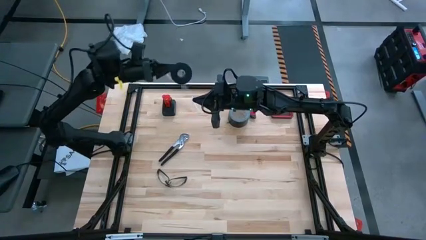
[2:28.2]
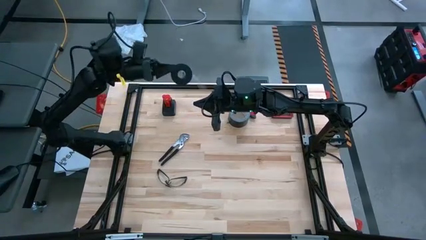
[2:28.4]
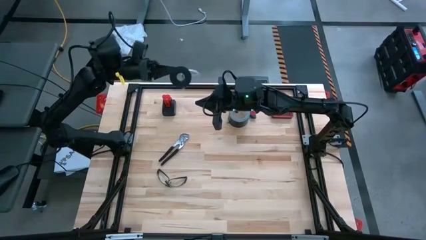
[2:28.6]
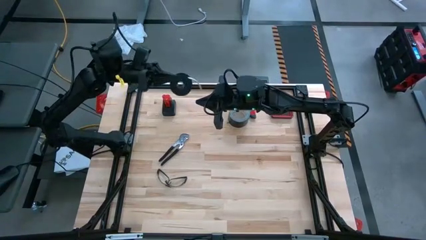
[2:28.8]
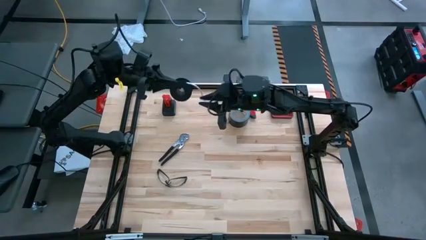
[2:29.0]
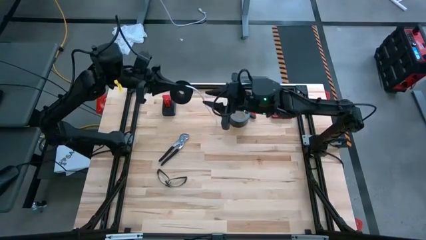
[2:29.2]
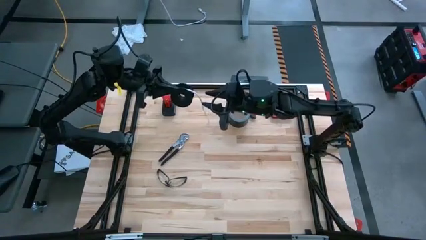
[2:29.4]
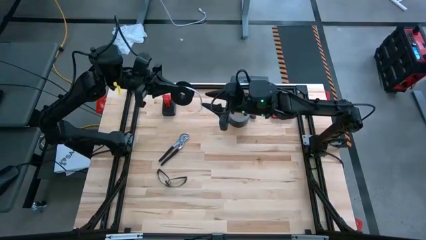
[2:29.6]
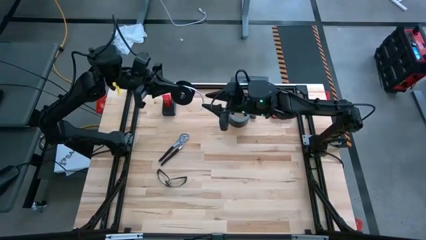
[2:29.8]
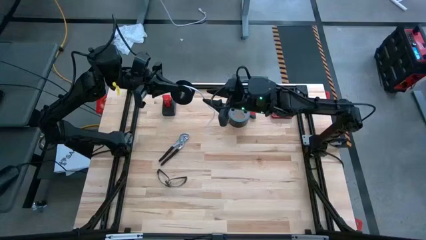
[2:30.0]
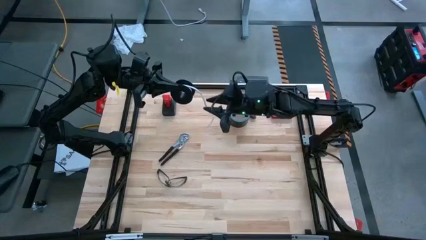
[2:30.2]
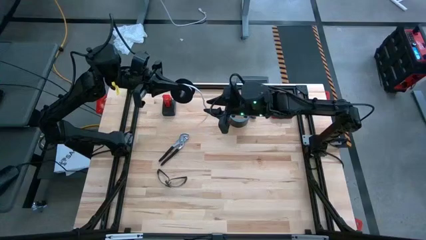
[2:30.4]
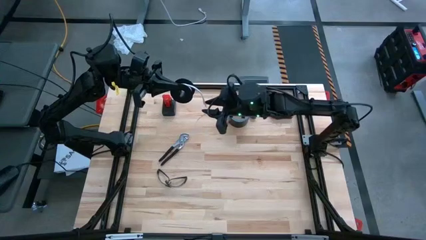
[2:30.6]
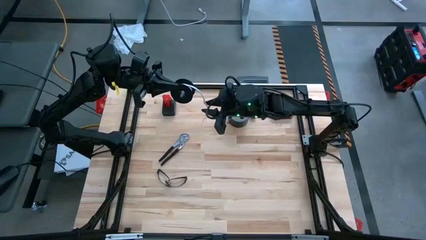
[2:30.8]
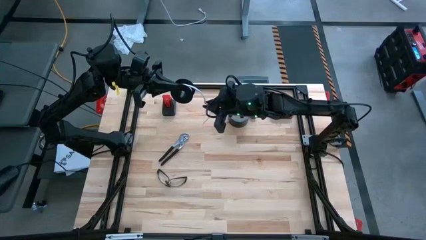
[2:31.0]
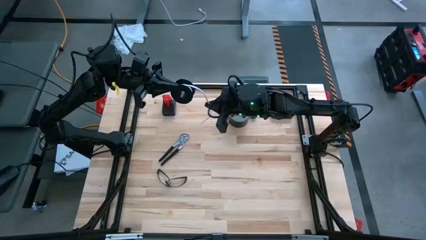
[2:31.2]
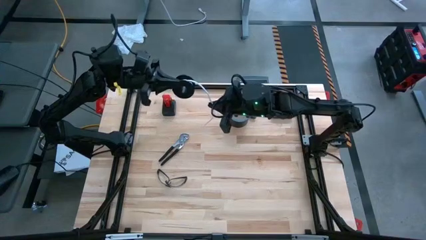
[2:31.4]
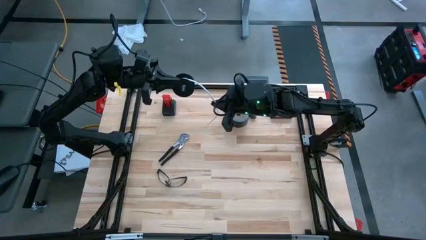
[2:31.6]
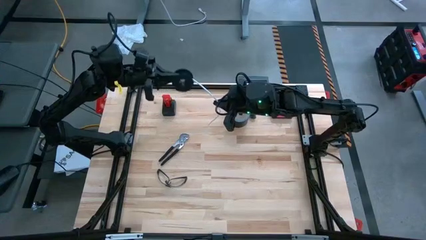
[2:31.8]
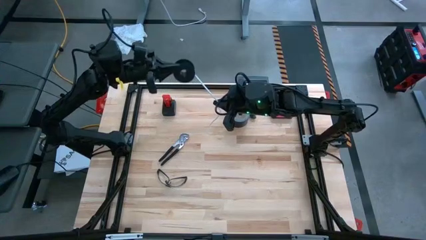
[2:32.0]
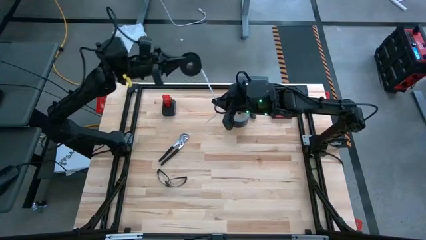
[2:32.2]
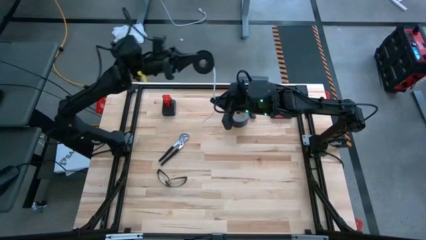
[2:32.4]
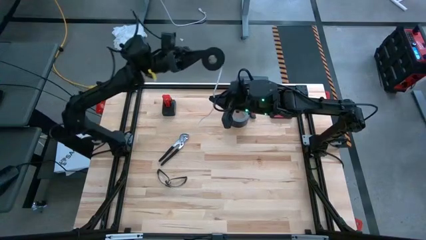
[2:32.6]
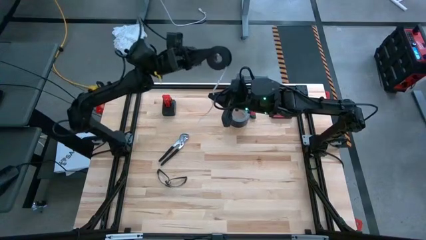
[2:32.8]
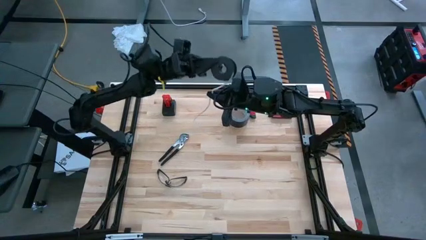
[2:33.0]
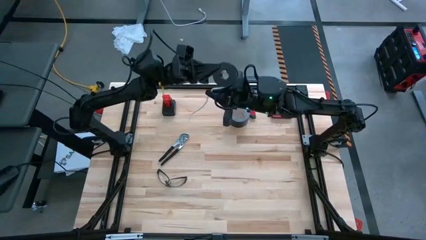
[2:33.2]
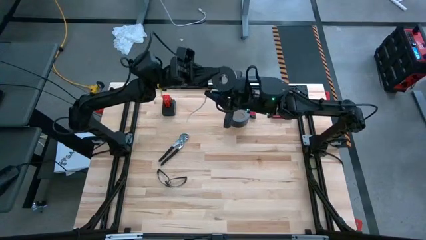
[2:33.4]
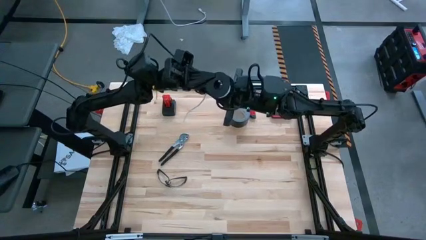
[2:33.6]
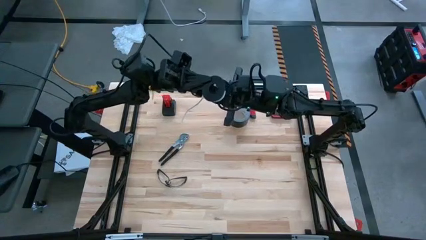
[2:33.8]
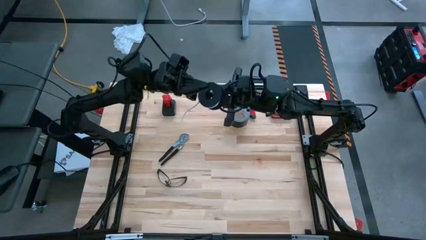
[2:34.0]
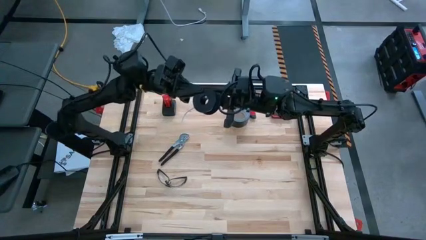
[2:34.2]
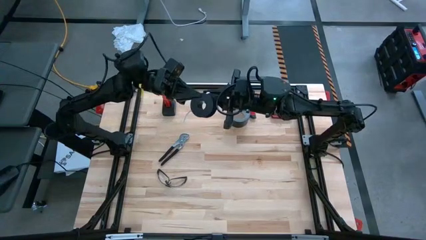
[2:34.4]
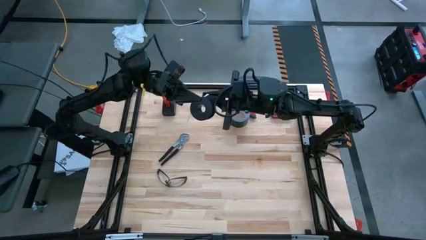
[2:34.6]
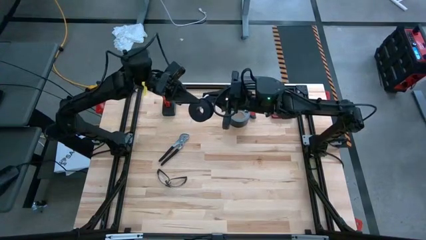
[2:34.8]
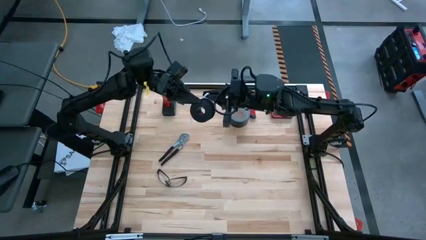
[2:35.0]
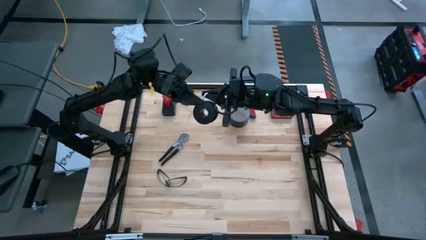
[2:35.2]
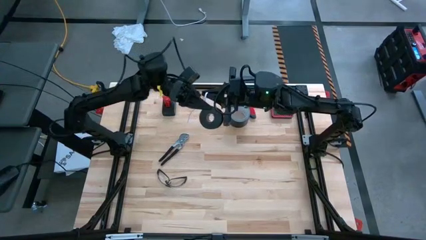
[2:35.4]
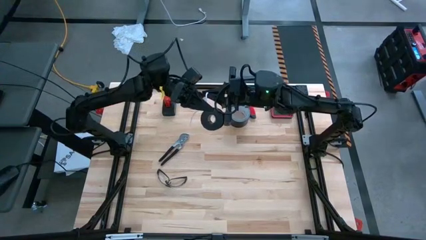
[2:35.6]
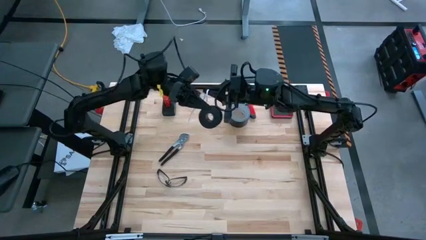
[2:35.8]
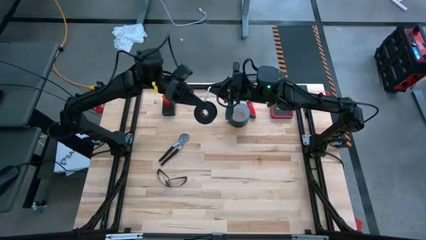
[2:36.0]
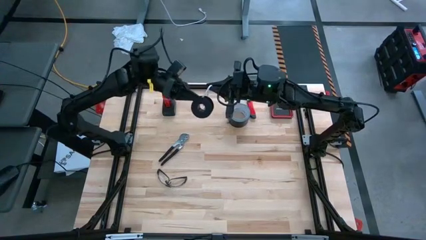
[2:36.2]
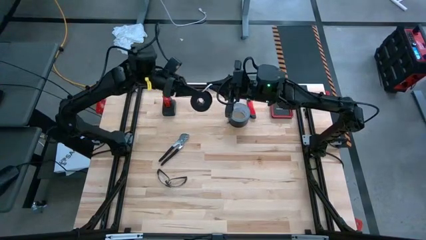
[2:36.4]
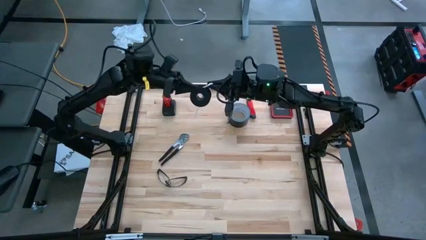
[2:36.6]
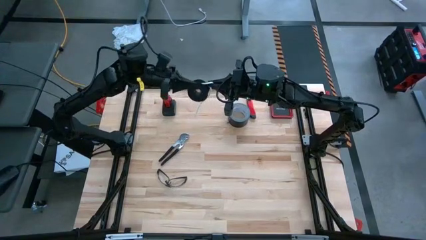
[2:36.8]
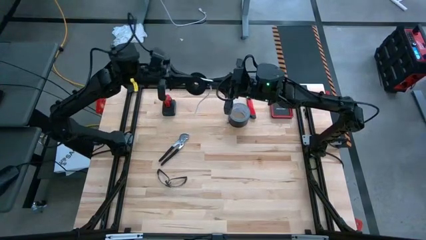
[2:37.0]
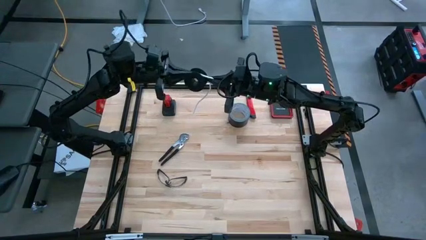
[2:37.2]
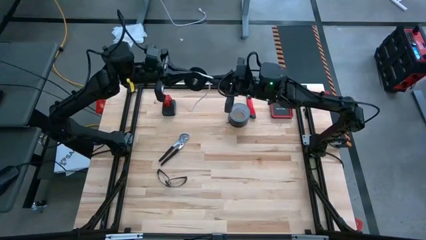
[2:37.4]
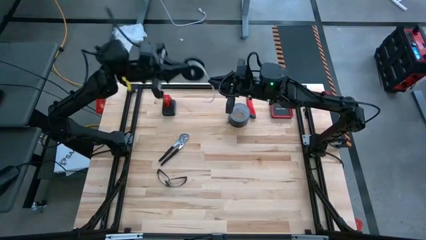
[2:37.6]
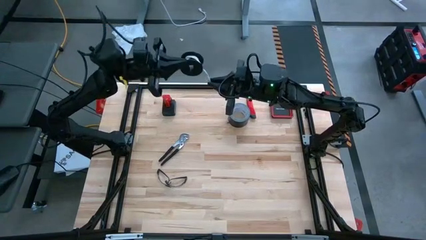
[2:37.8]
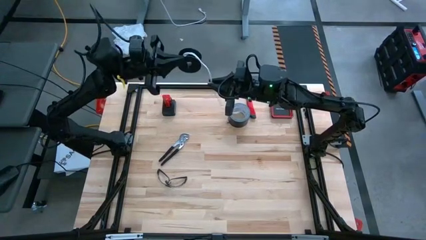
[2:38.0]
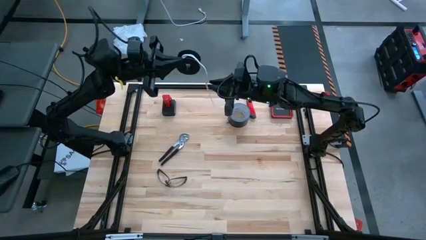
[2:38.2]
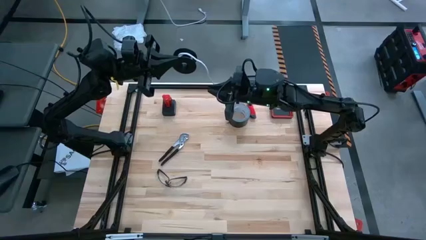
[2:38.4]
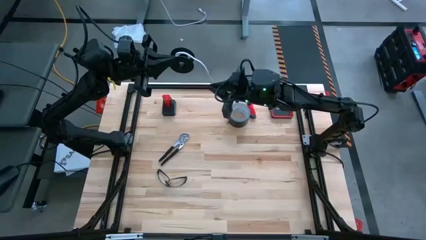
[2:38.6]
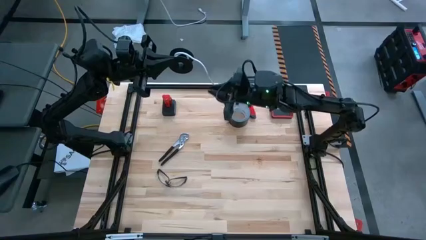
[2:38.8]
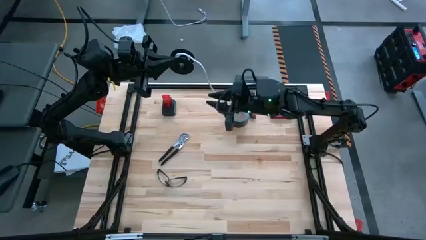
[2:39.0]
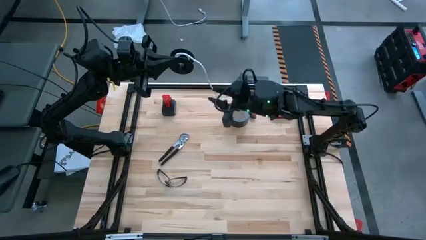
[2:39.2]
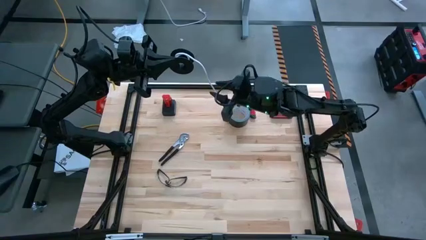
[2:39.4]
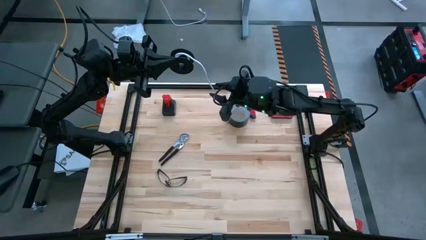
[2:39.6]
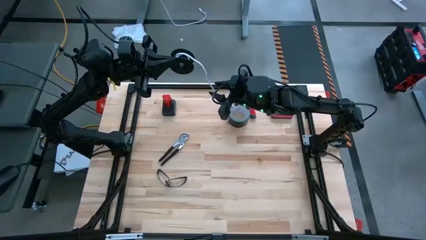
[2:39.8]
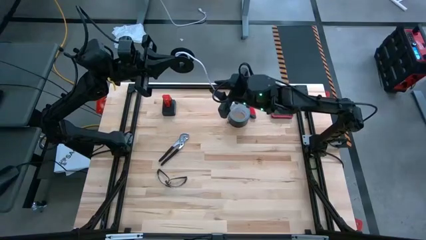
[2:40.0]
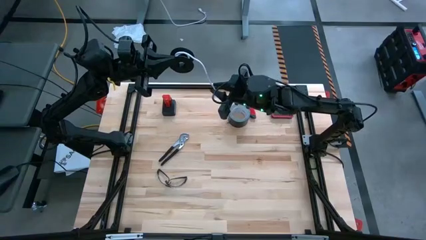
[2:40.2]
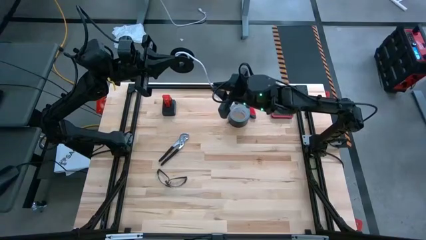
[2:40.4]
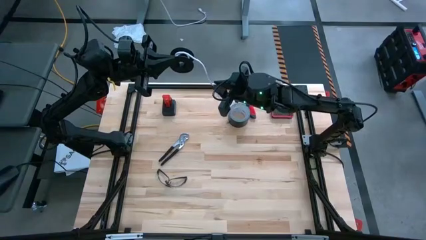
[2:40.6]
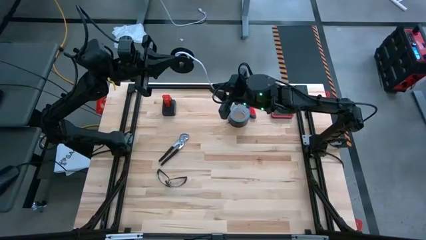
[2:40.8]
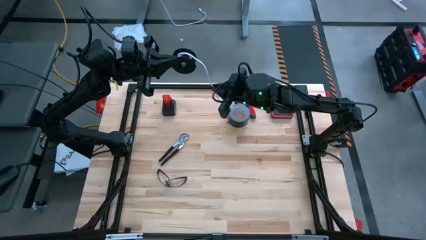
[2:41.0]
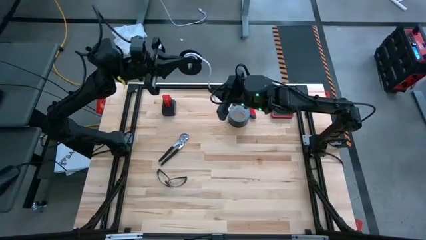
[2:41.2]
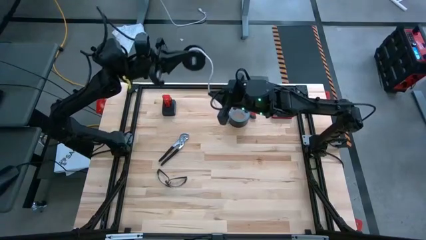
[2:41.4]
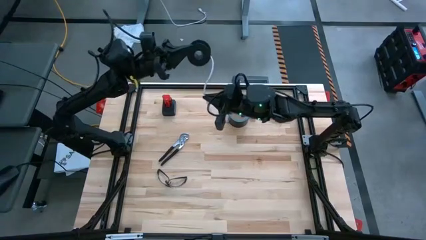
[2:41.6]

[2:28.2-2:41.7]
Task: Coil cords
Coil the white wire onto the black spool

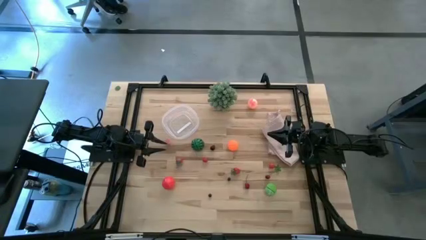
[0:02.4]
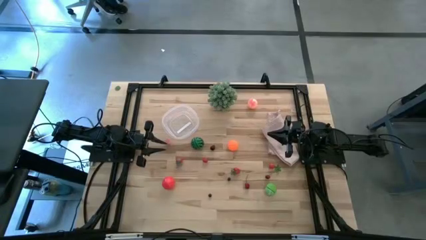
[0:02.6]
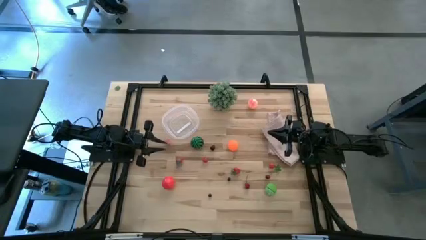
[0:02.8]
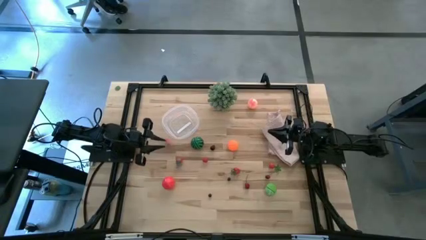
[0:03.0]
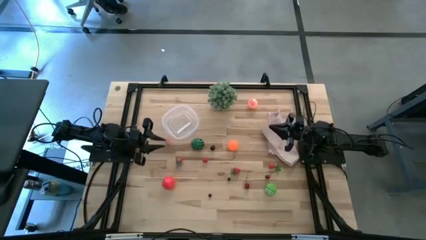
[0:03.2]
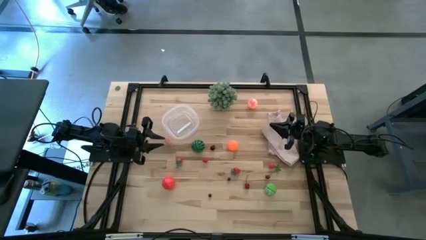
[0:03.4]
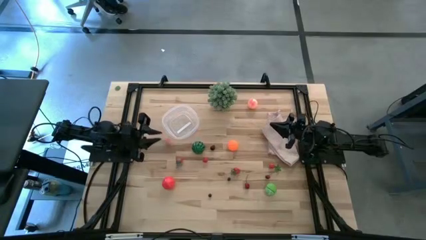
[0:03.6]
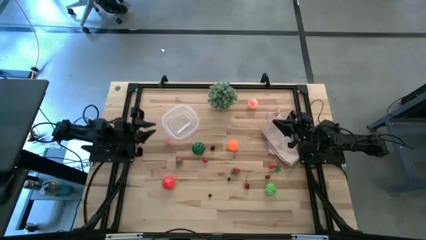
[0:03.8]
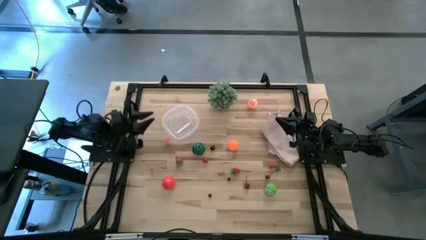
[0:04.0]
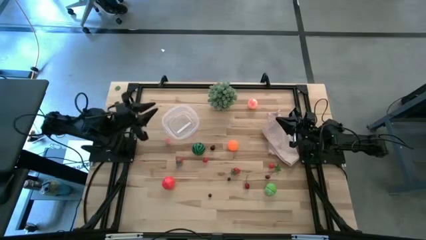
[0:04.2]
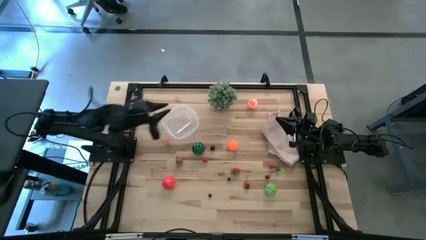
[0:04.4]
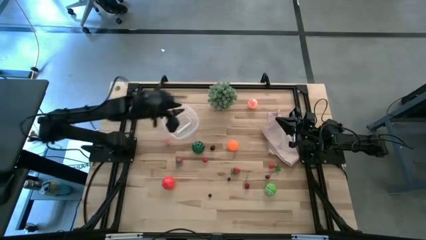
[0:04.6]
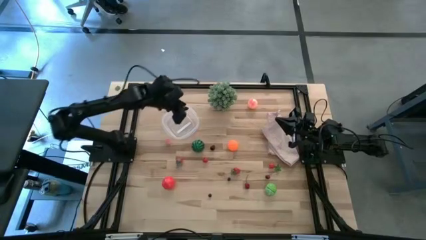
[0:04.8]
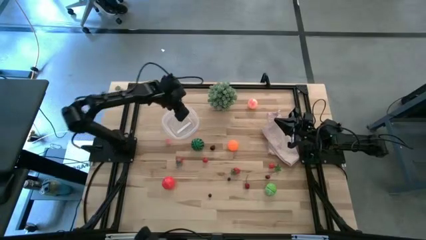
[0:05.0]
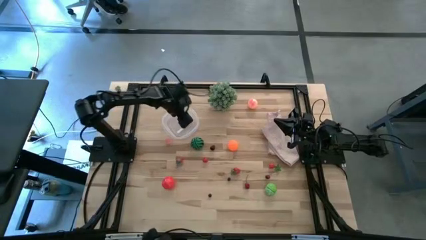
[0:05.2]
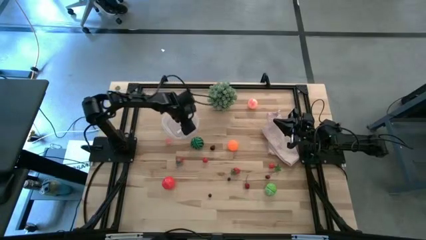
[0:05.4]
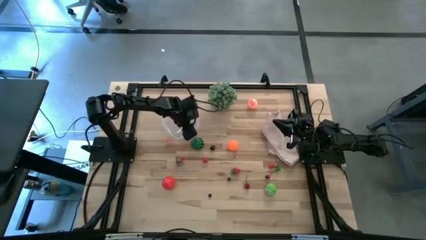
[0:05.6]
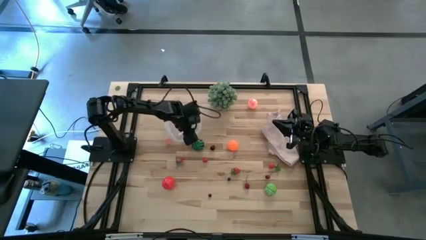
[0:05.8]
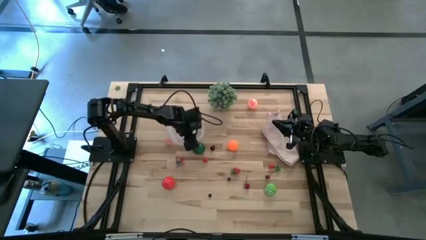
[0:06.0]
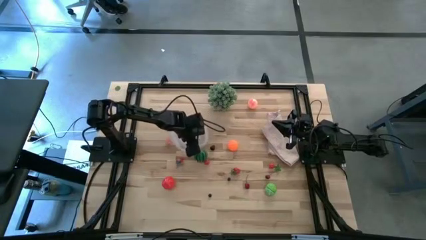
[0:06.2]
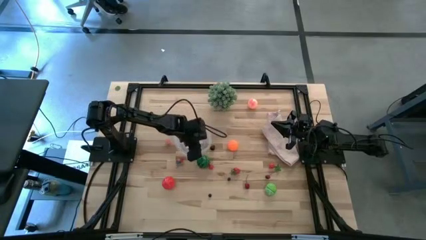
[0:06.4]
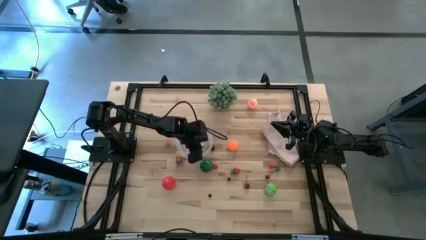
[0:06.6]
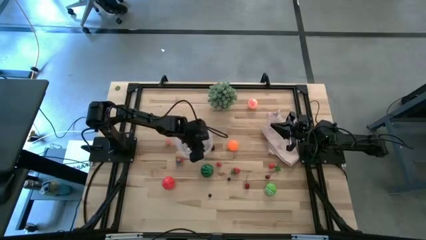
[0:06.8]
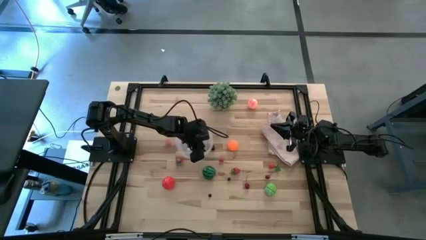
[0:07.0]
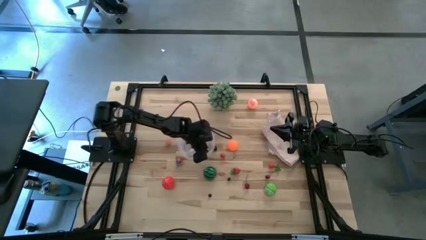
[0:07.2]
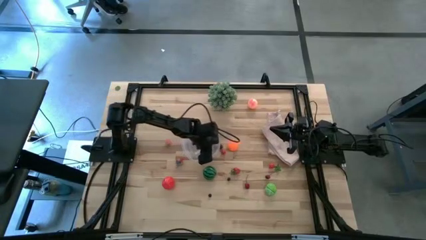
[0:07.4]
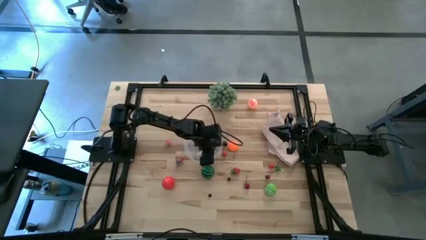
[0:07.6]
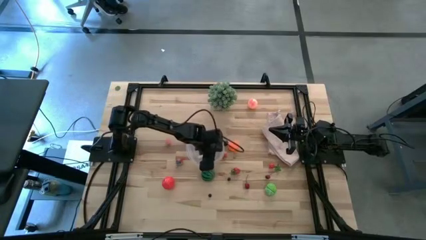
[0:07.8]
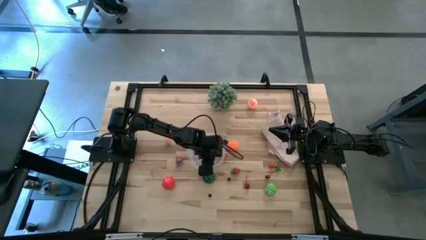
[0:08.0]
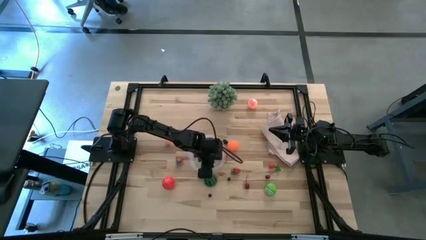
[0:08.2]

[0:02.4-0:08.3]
Task: Pick and placing Produce into tupperware
Move the transparent bin to the center of the table
